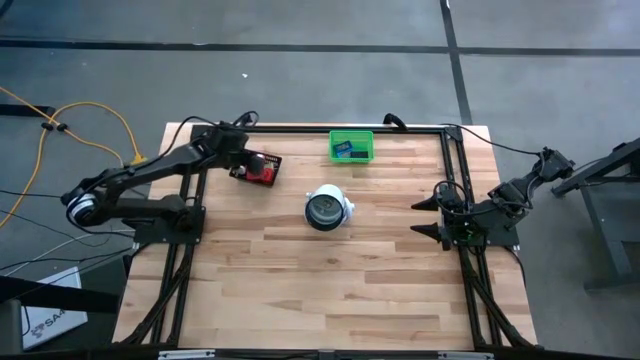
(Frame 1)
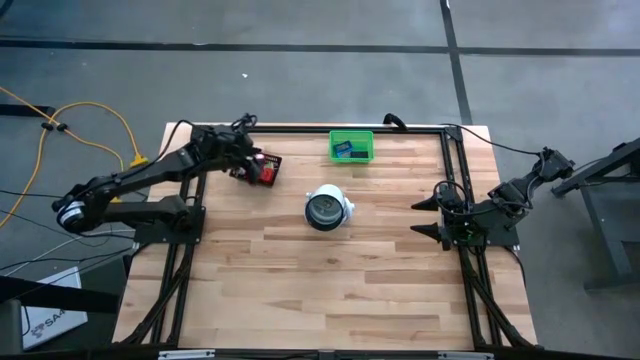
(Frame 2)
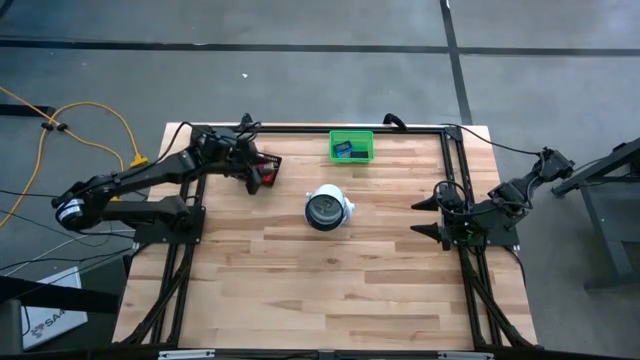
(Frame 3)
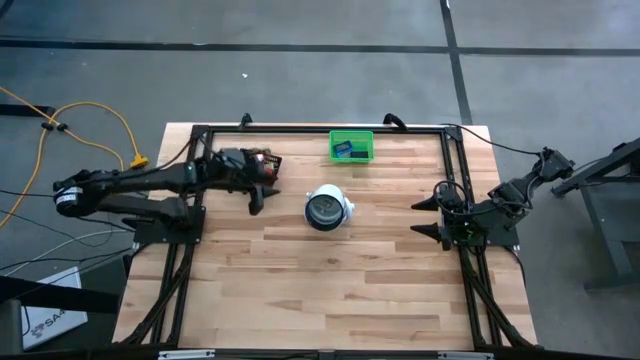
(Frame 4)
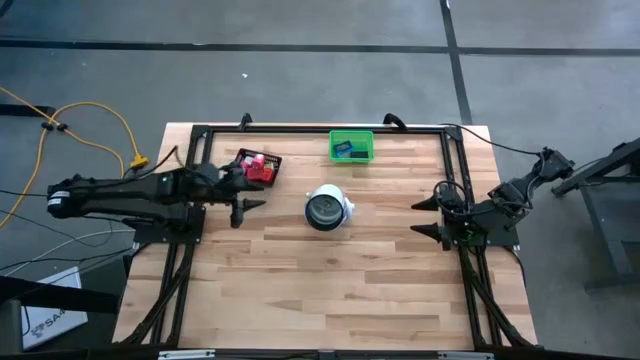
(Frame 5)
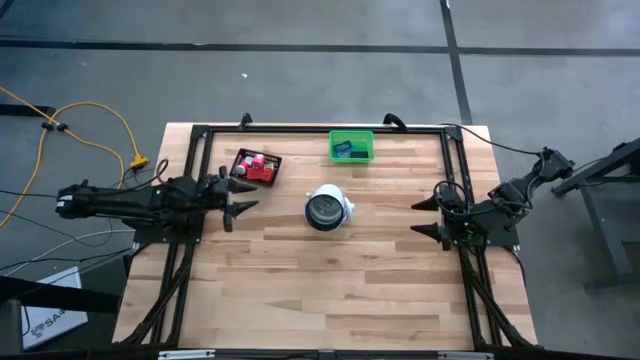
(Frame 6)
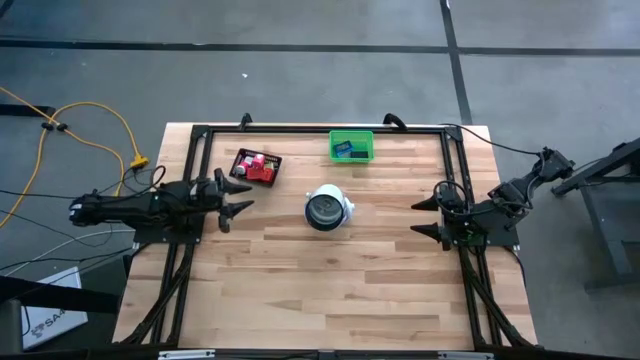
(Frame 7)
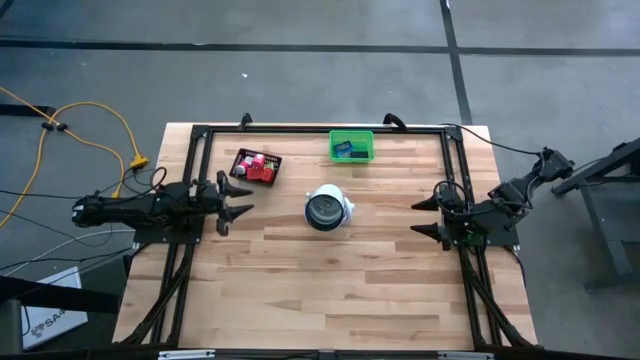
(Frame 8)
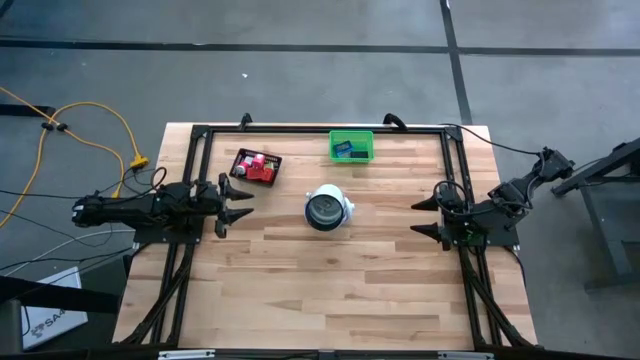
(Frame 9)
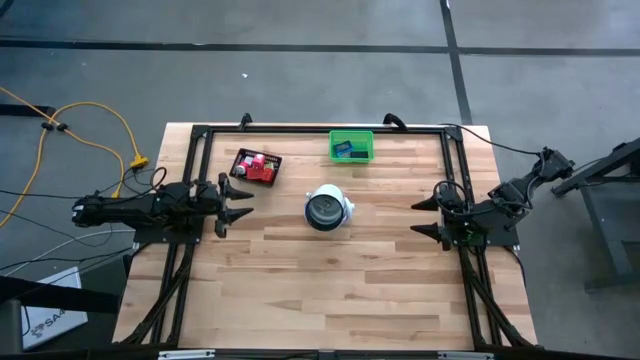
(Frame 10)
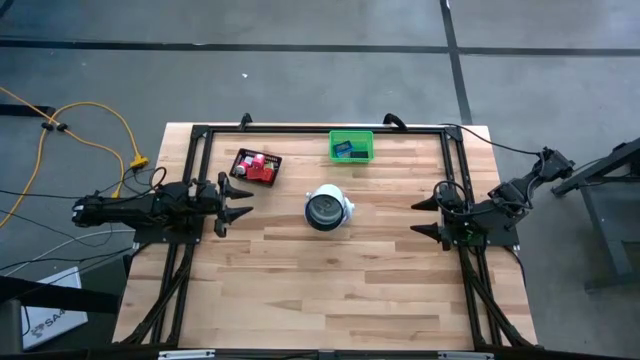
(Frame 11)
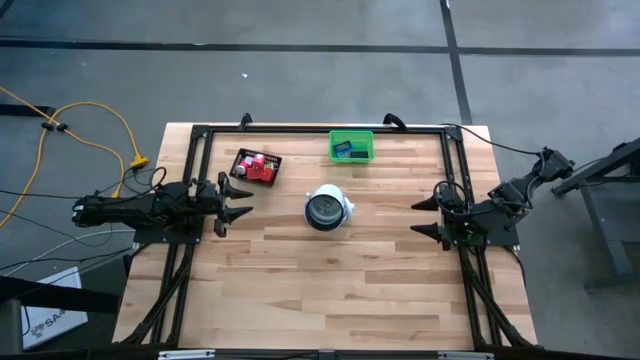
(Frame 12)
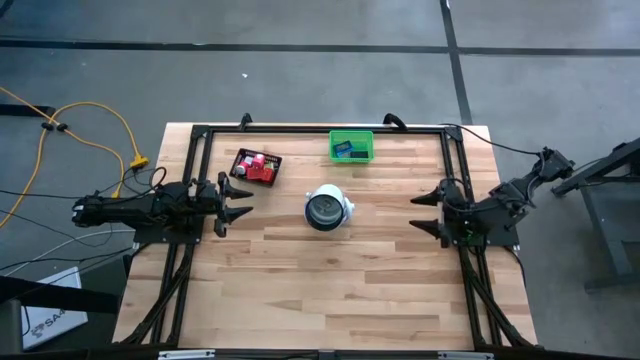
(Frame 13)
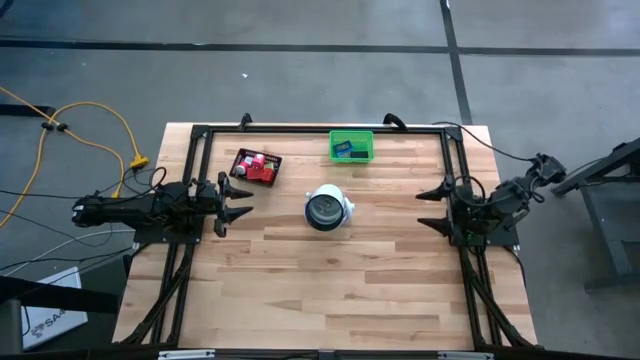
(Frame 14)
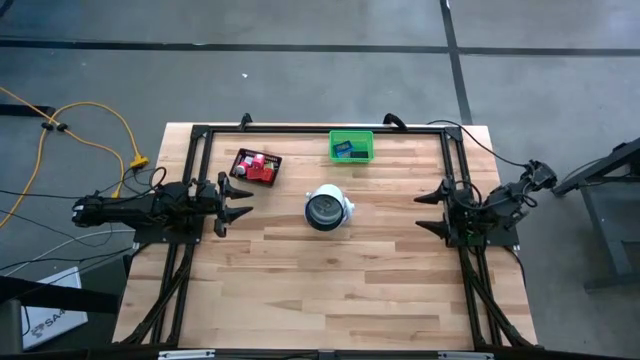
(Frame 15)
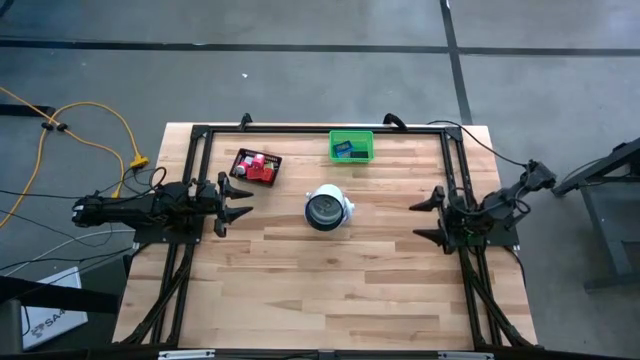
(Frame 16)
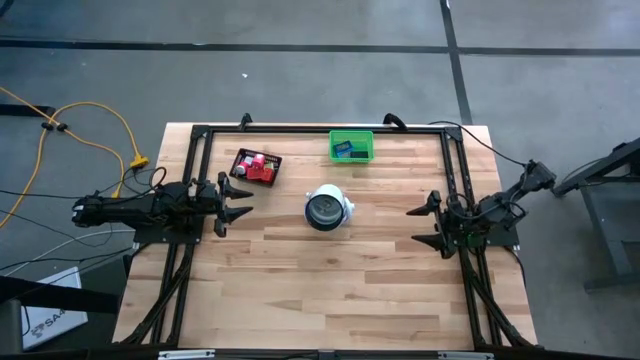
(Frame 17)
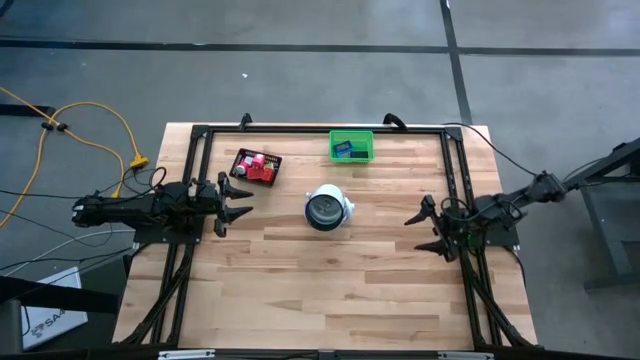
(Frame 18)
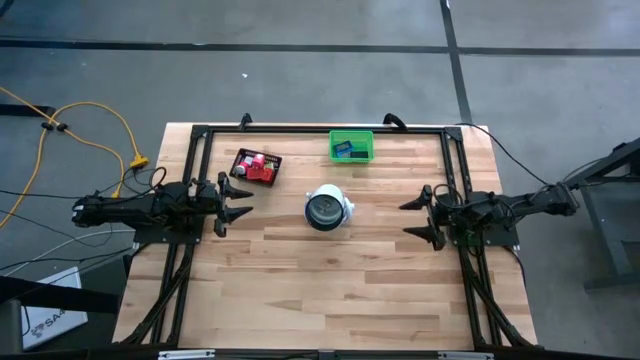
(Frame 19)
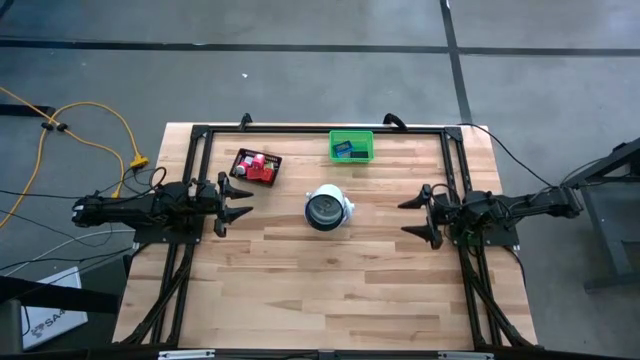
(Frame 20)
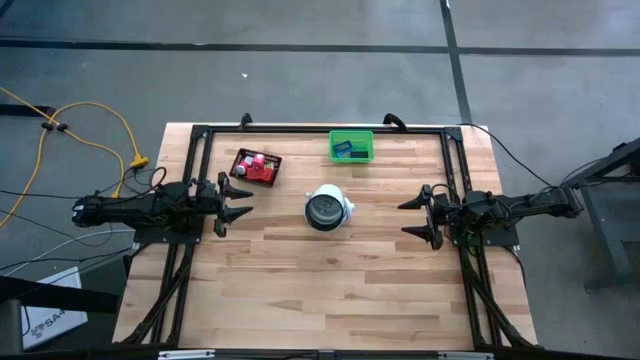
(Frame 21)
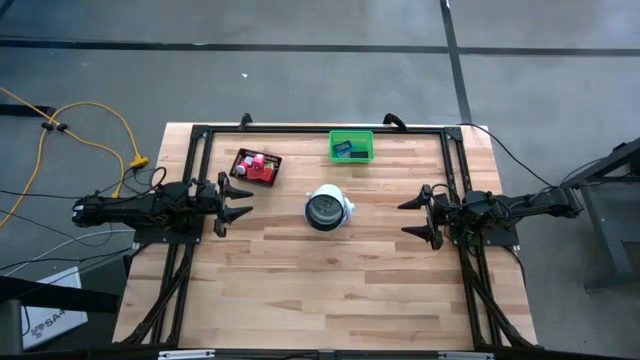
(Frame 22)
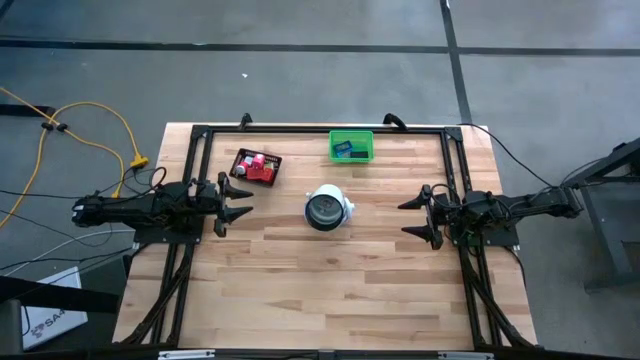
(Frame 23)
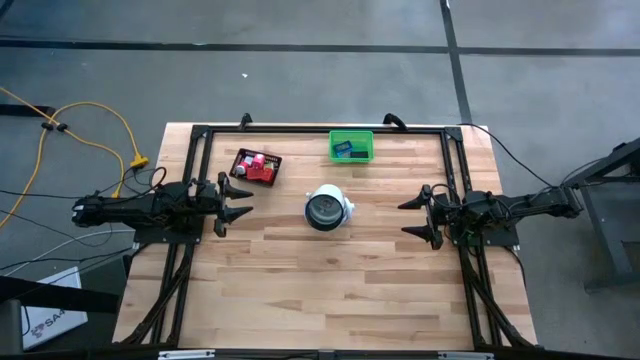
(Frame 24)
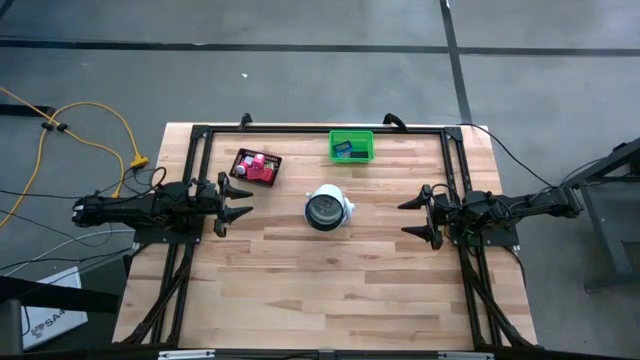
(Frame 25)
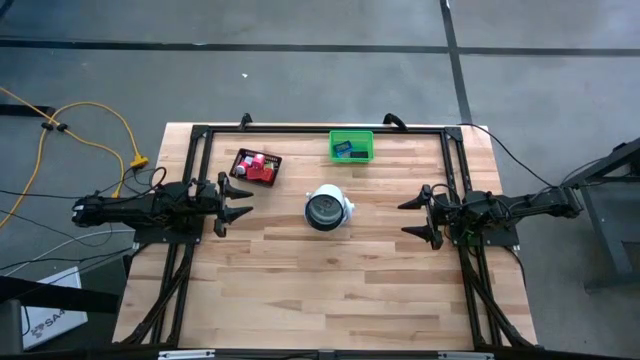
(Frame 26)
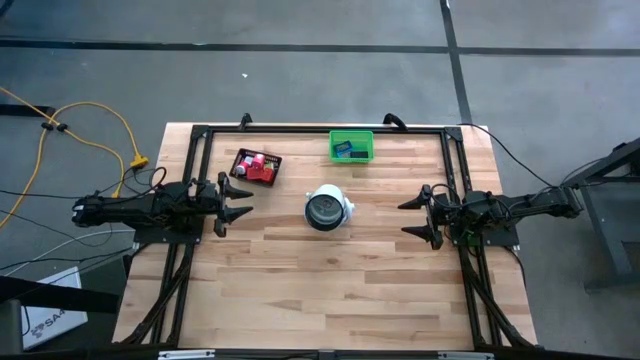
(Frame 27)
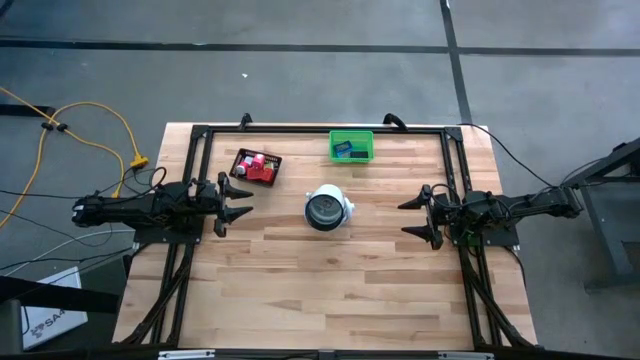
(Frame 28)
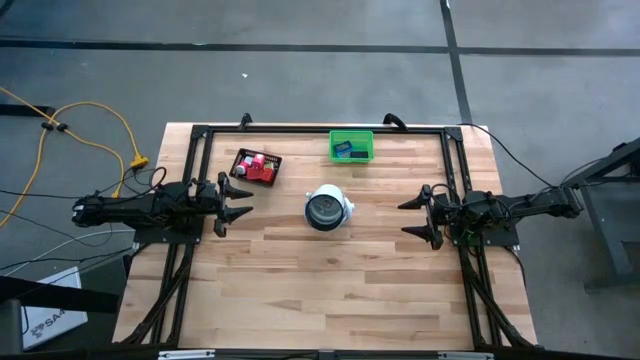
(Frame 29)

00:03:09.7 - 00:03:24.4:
Task: Pick & Place Office items
Return to Home Position

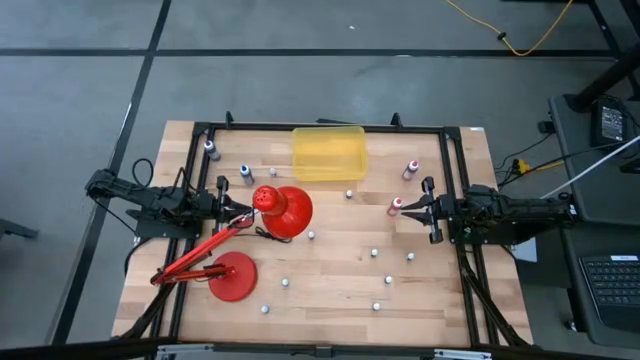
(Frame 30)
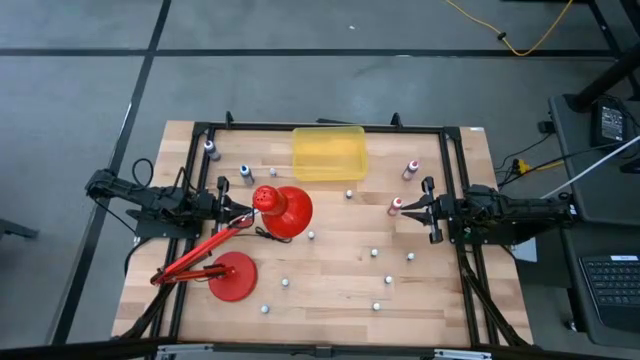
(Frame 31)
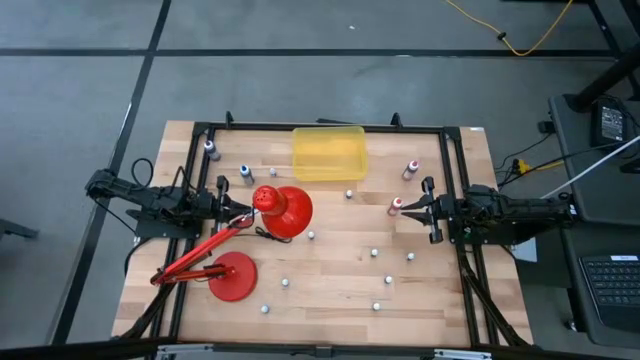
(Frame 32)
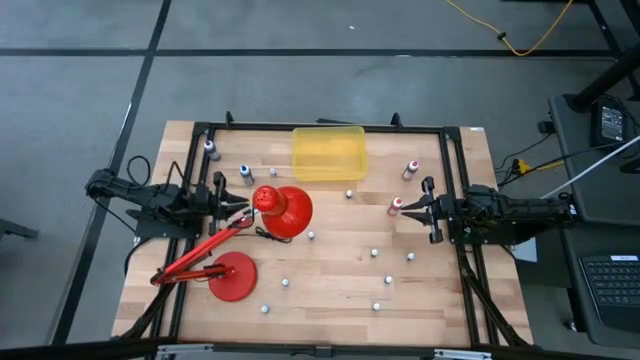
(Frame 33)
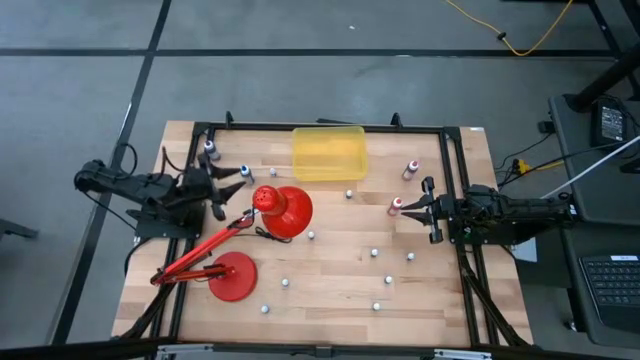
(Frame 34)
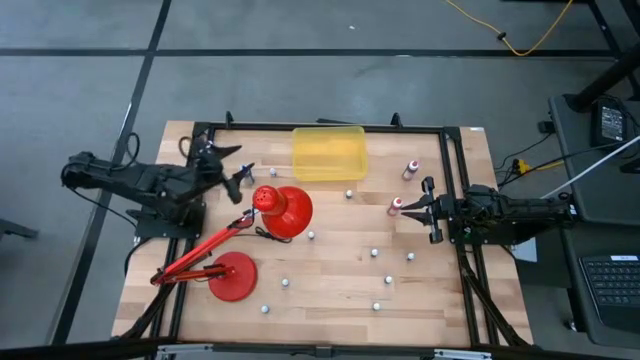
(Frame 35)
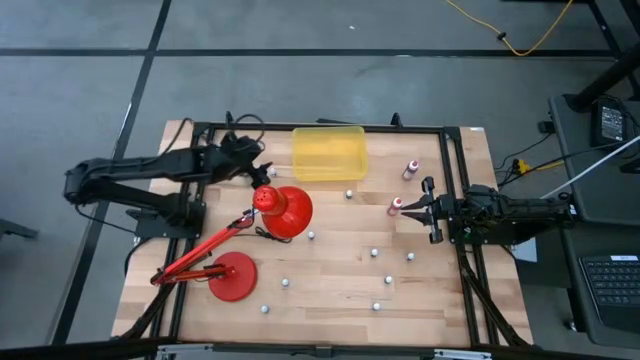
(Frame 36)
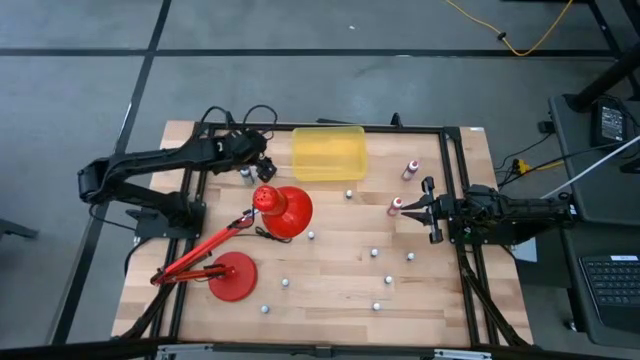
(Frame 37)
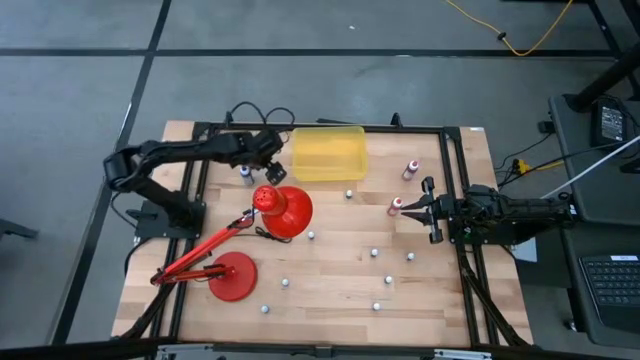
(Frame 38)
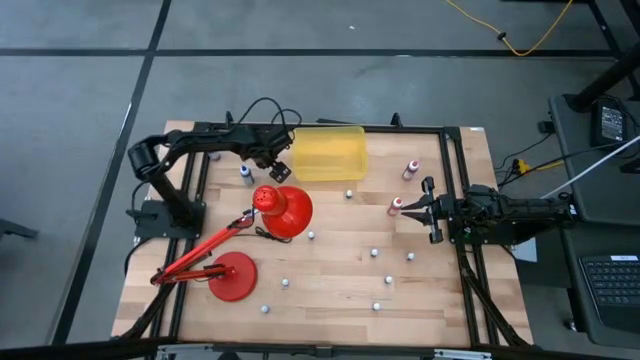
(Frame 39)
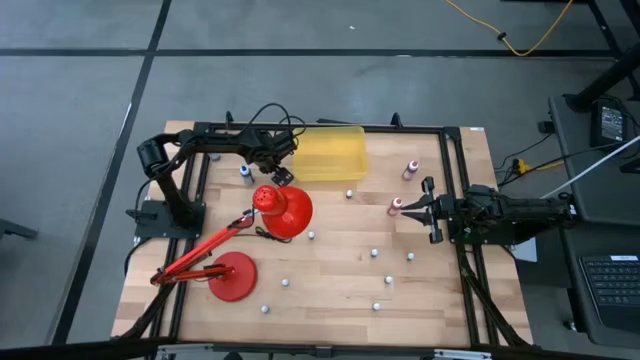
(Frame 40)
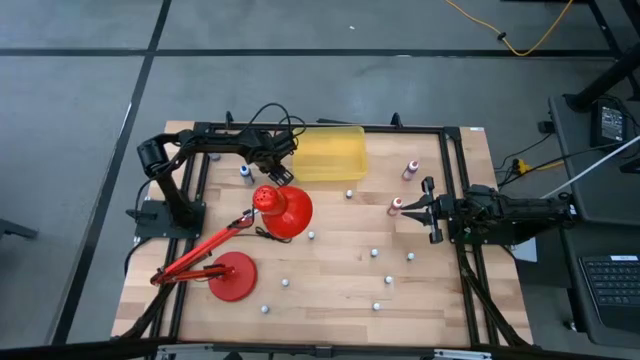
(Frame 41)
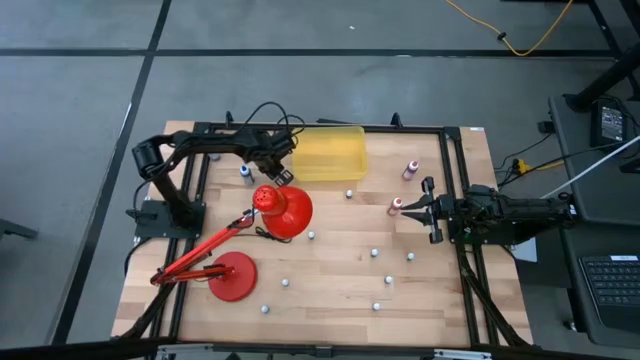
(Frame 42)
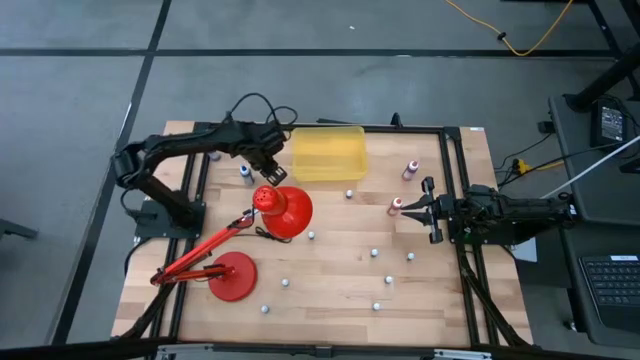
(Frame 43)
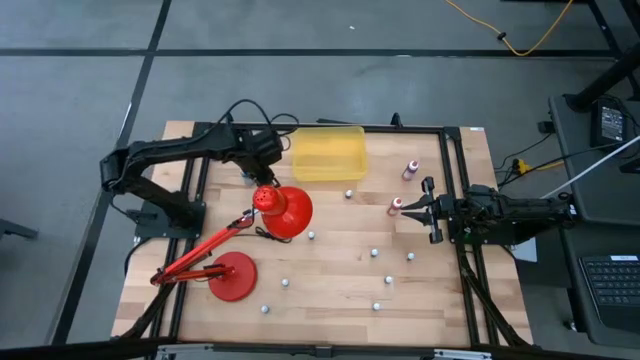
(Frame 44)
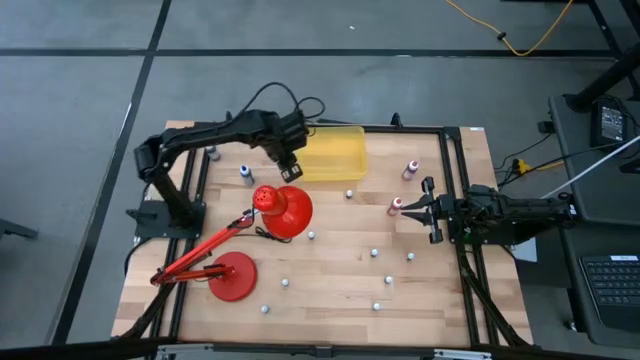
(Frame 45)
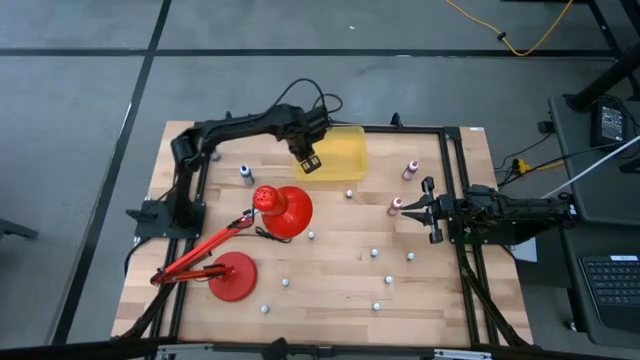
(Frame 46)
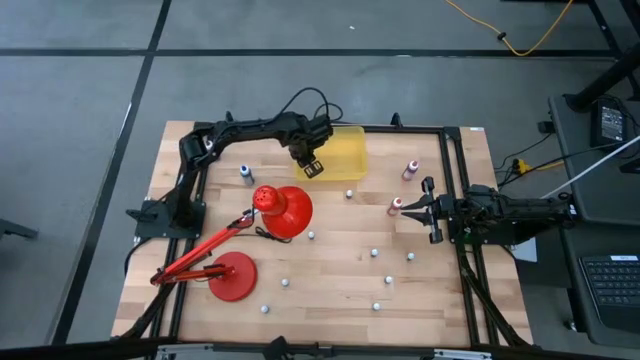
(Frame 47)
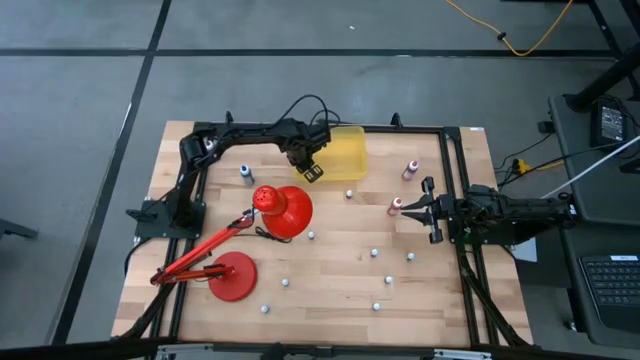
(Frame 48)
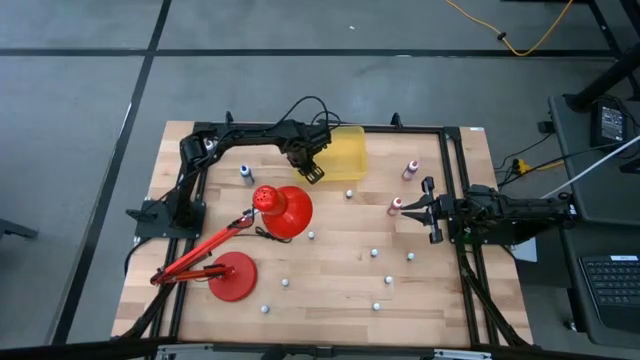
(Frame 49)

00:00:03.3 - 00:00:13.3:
Task: Pick & Place food coloring
Put the green food coloring bottle into the yellow bin
